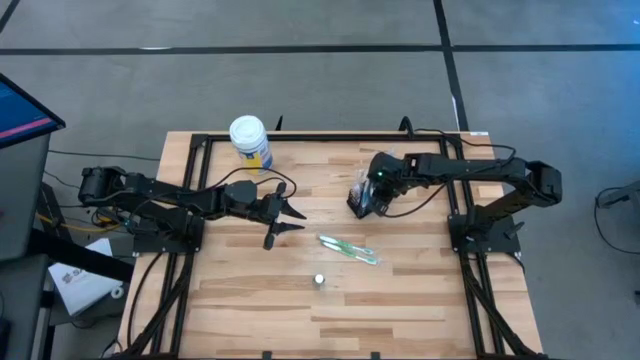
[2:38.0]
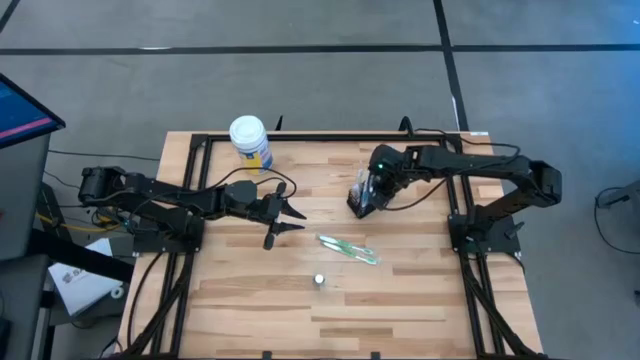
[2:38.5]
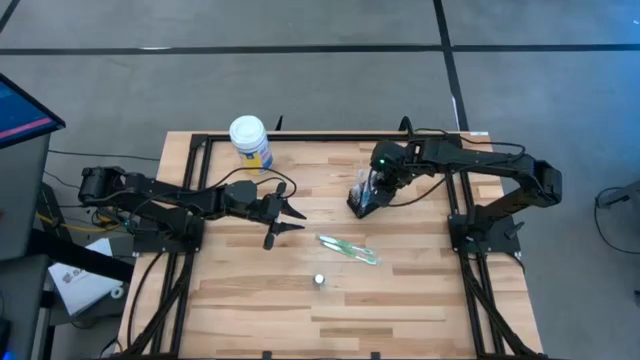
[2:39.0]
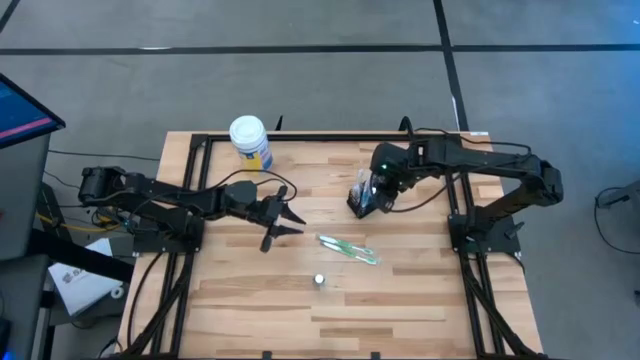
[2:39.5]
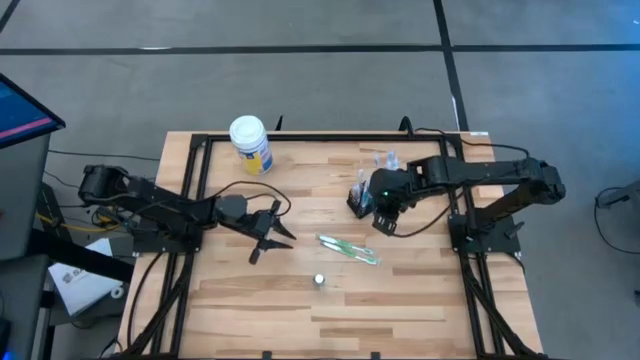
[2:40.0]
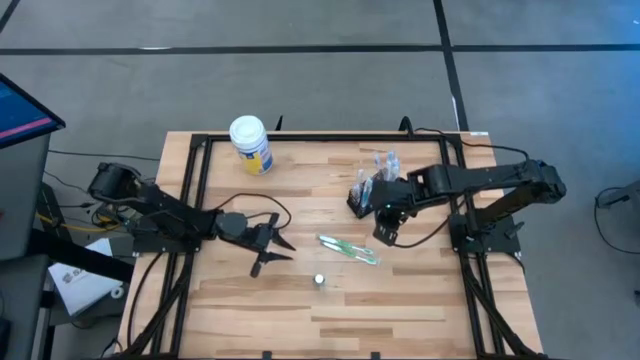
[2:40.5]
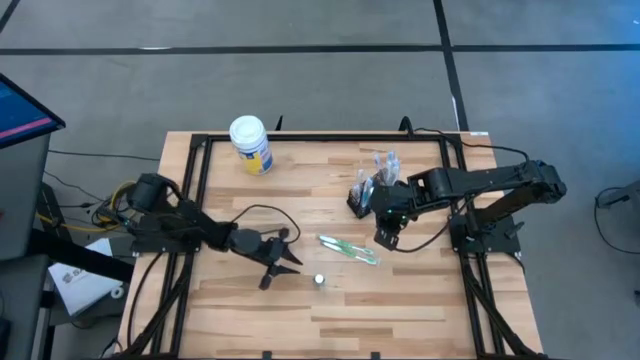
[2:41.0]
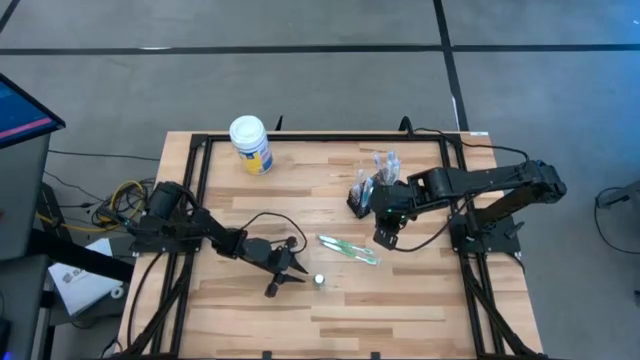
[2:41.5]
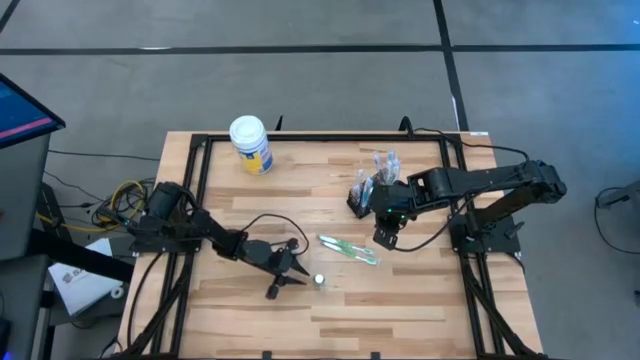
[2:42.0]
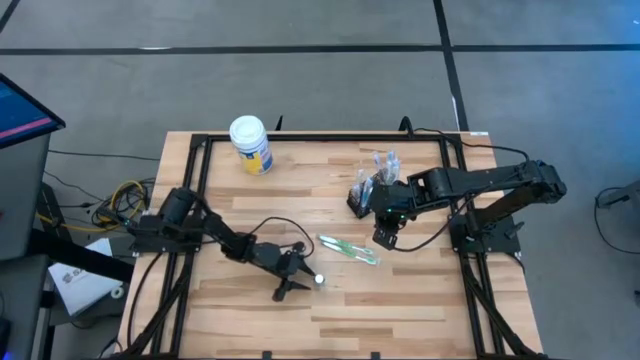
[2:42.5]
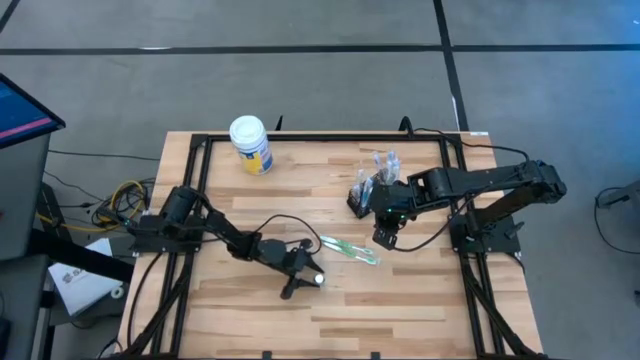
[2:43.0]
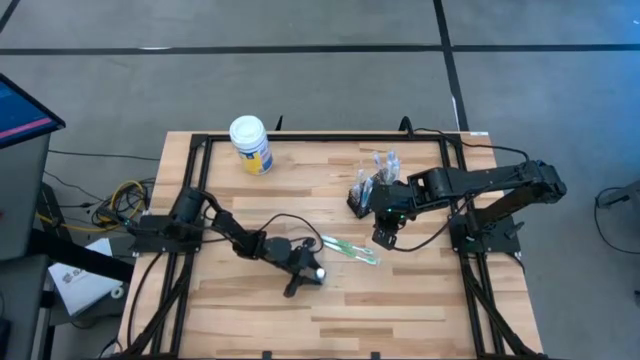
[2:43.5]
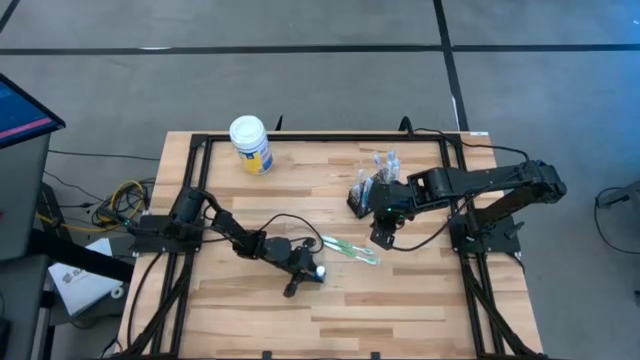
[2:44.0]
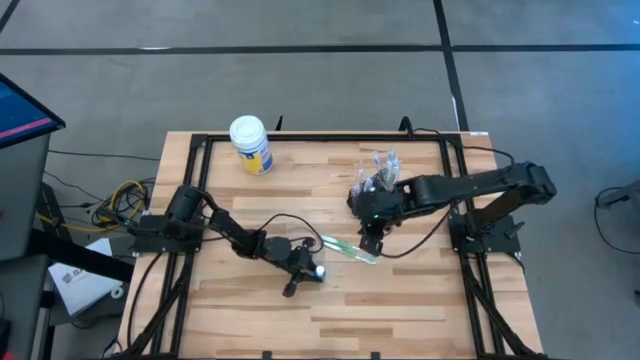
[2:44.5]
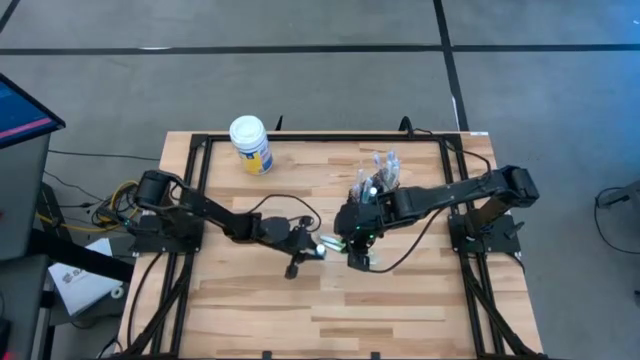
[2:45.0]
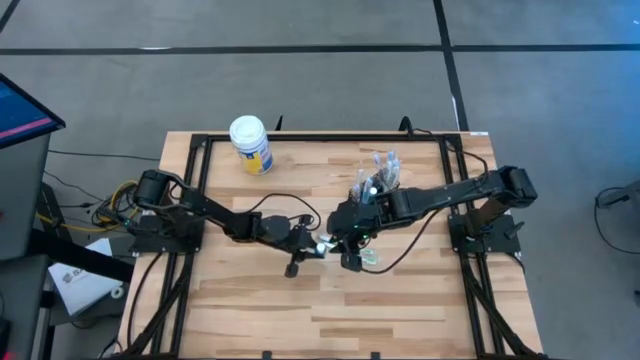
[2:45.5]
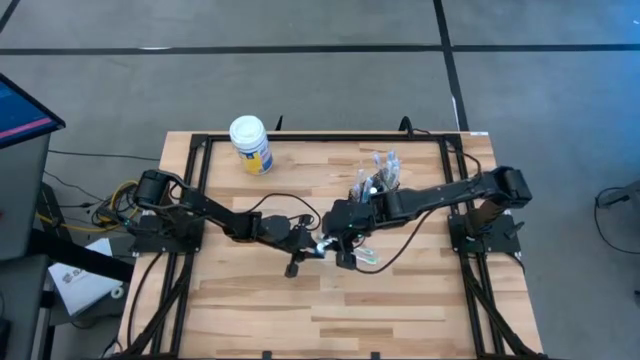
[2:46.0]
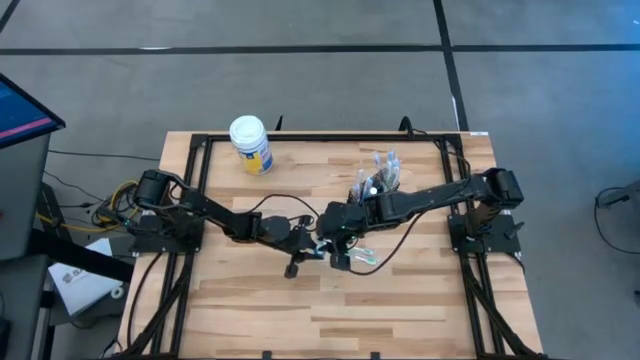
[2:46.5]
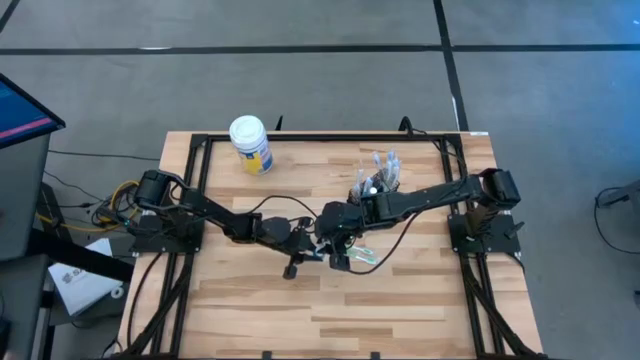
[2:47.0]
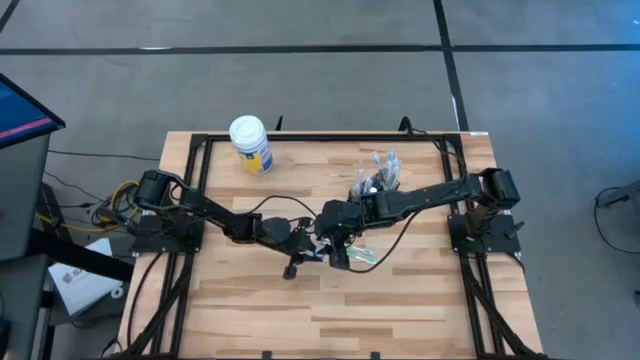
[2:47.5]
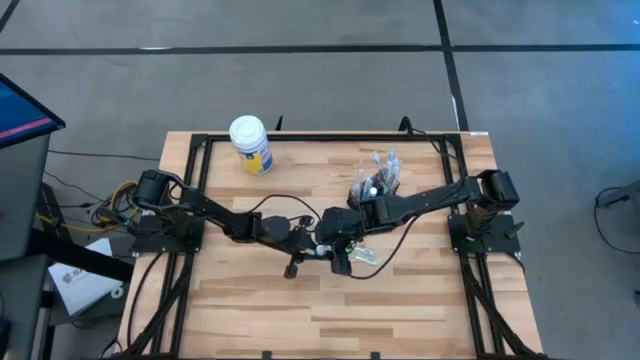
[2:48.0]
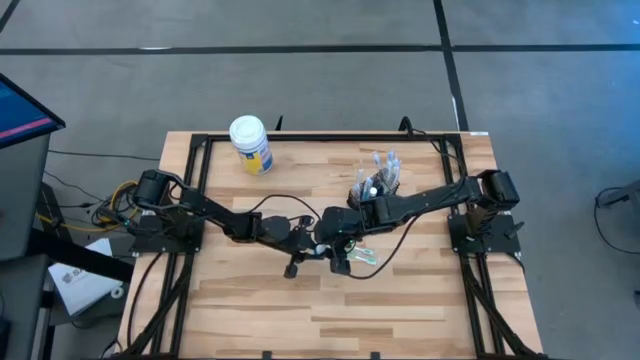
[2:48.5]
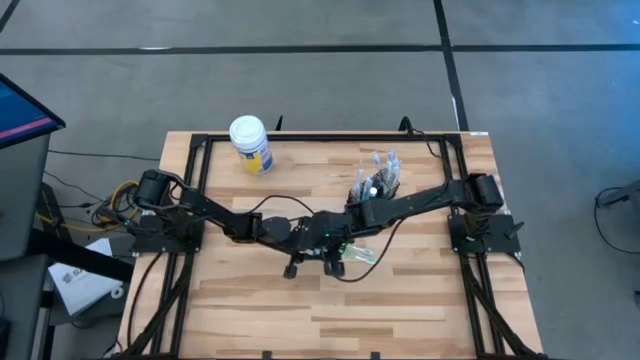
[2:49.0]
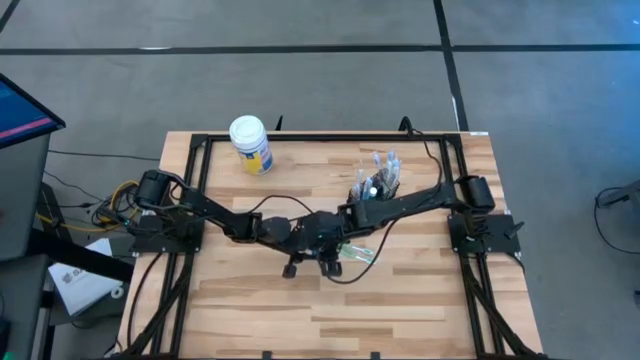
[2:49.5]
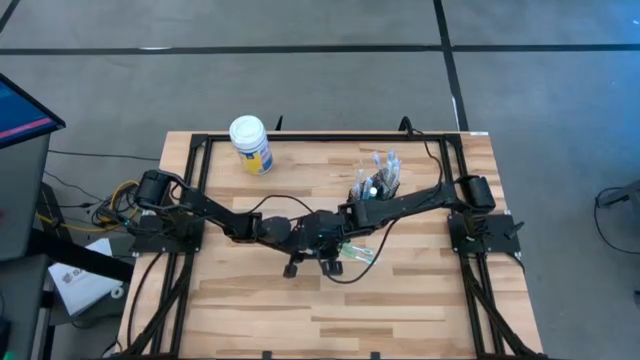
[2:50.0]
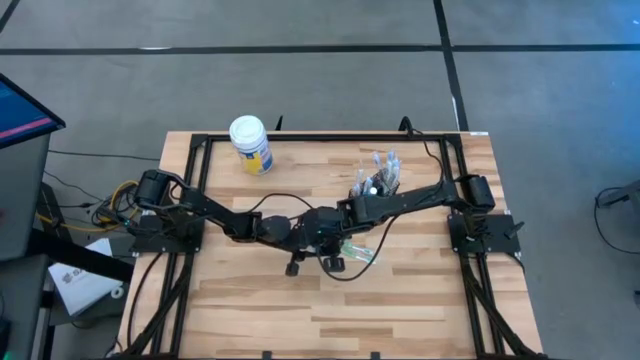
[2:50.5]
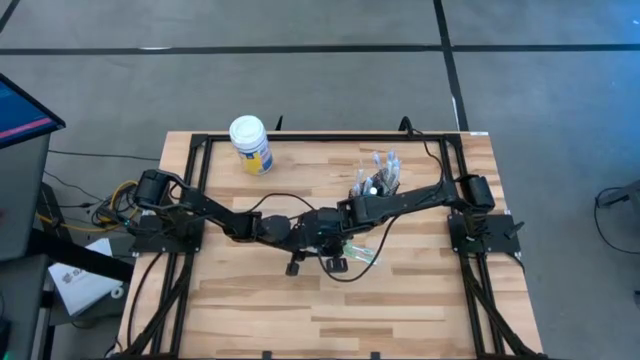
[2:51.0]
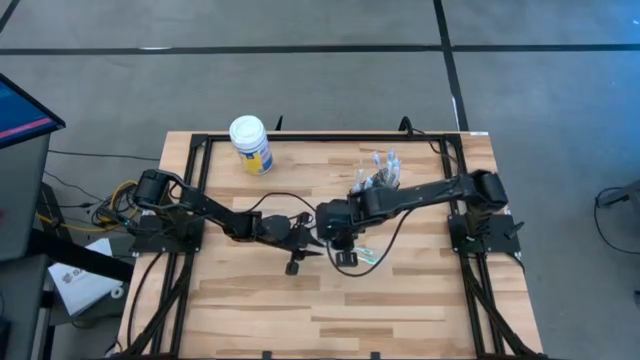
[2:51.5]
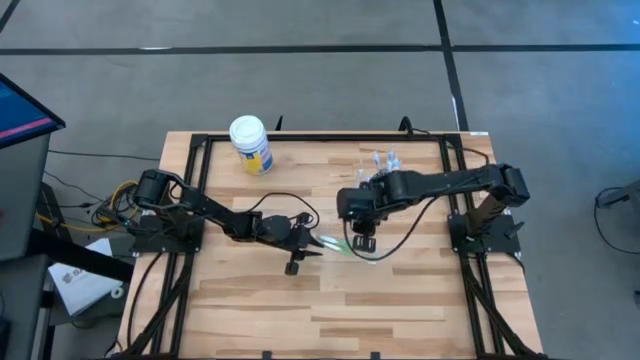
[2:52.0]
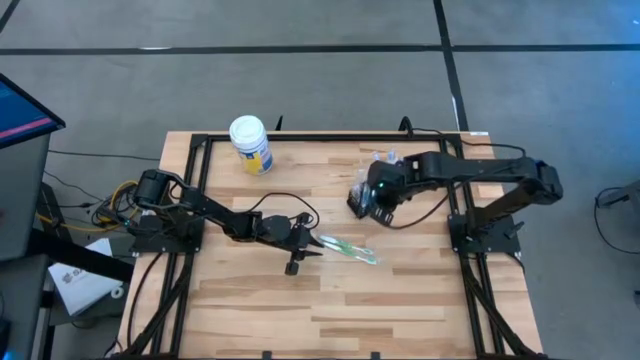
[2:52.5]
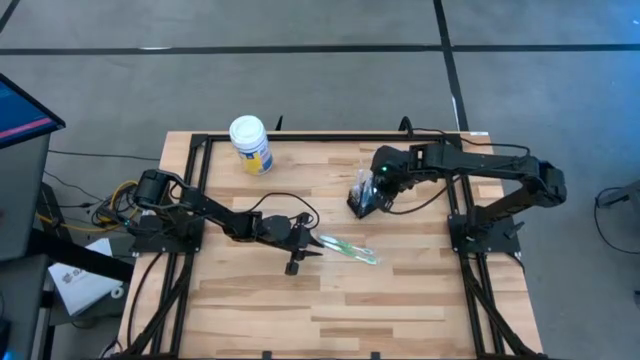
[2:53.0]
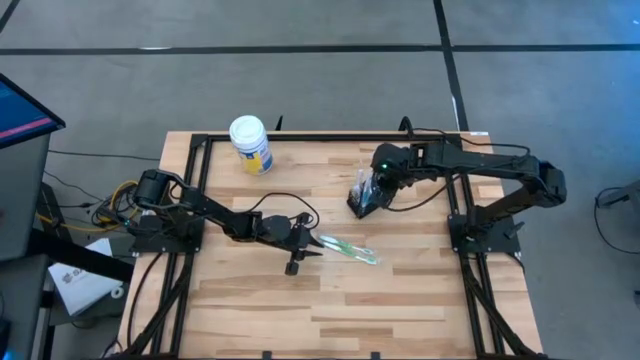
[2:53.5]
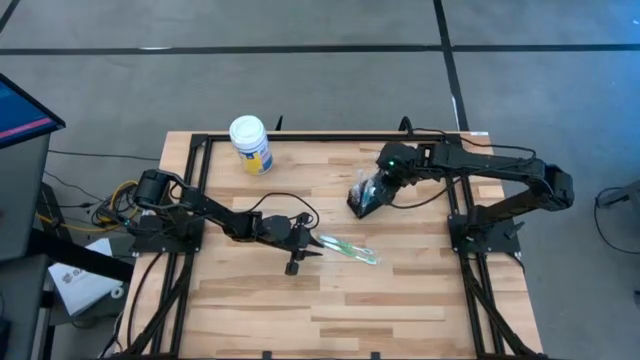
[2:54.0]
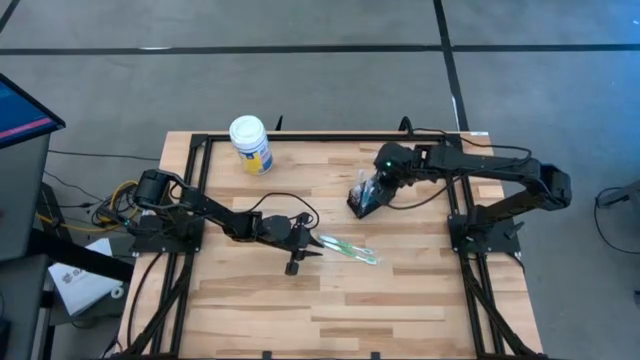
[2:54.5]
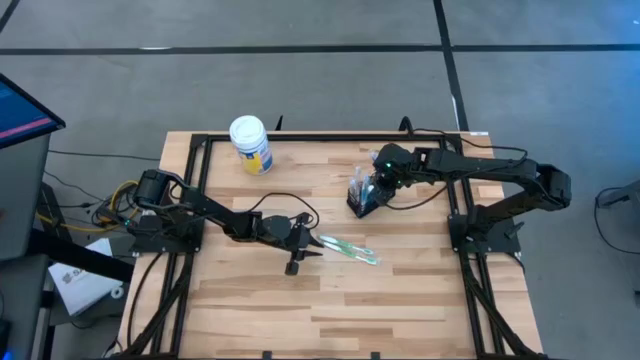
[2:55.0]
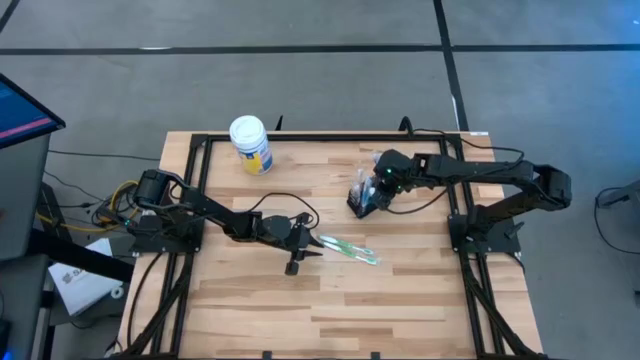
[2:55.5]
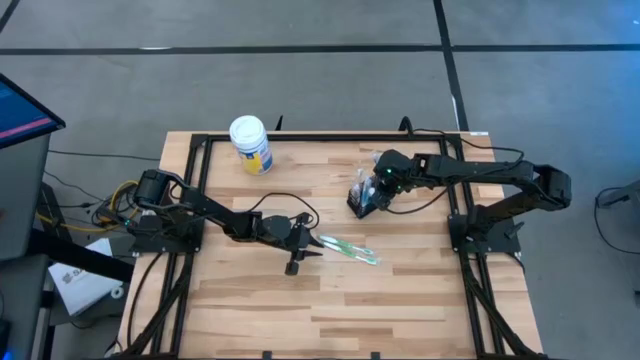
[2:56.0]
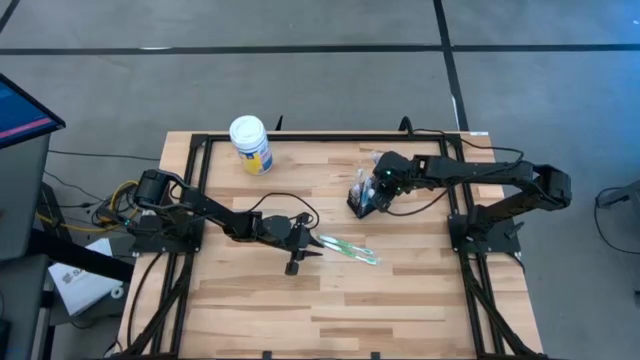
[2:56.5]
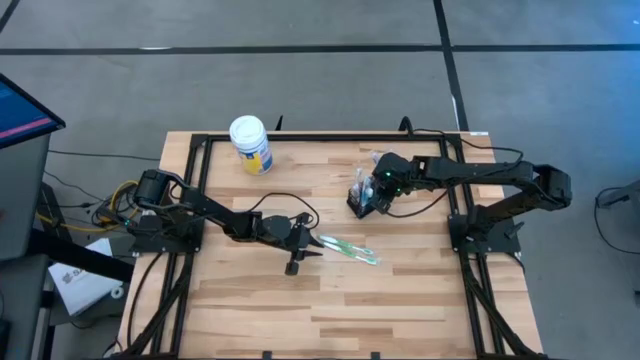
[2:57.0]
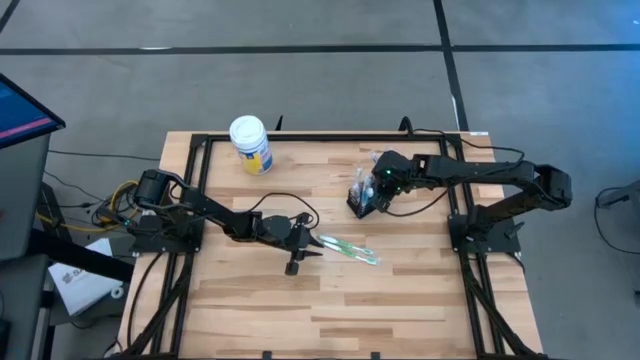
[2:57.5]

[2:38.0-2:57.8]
Task: Pick & Place toothbrushing station
Put the blue mouthwash into the mesh organizer

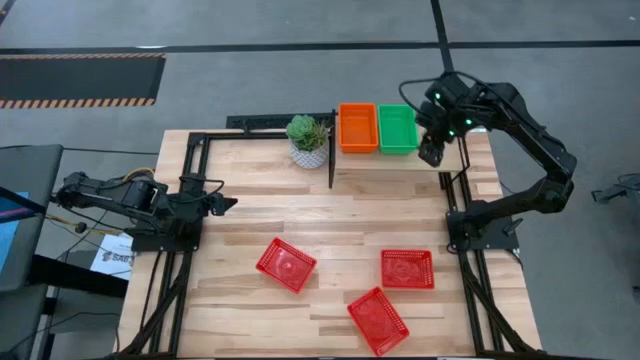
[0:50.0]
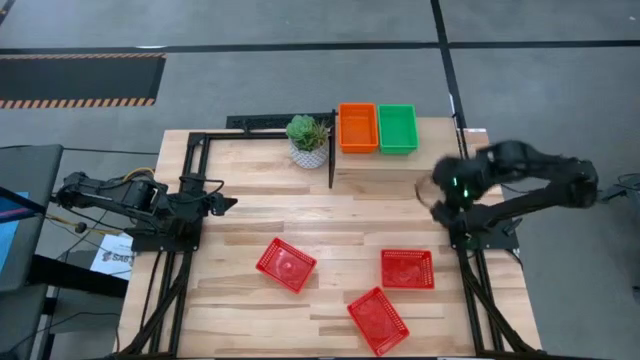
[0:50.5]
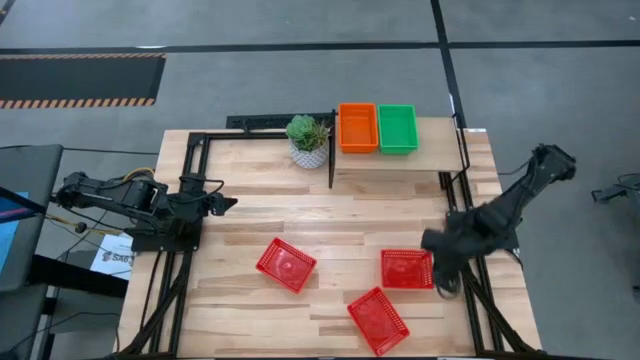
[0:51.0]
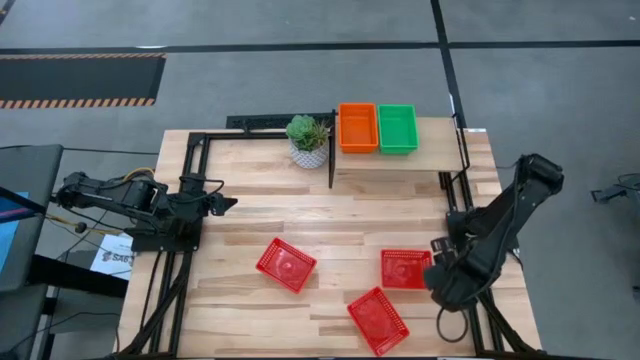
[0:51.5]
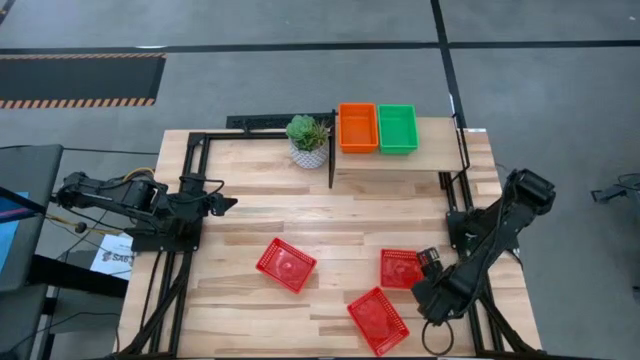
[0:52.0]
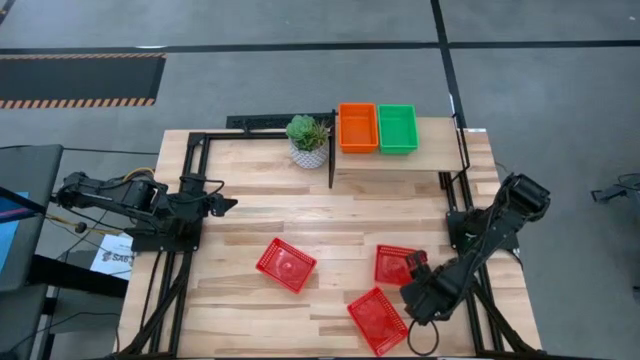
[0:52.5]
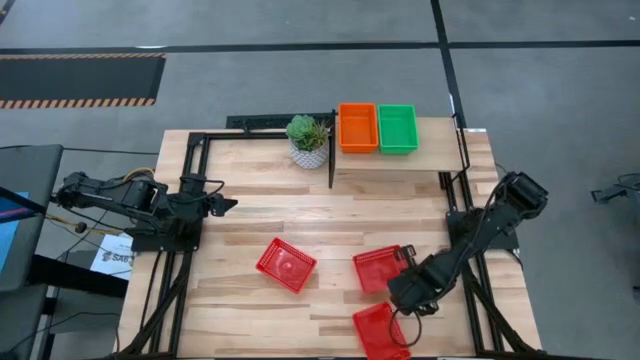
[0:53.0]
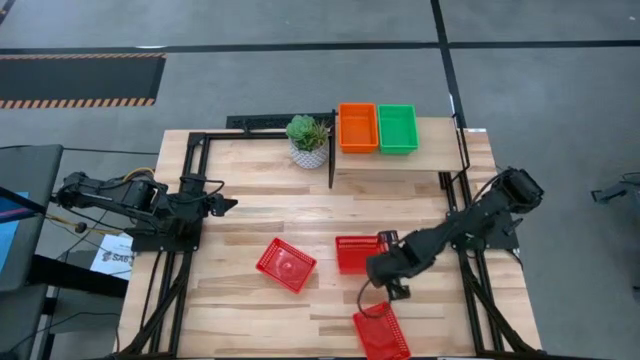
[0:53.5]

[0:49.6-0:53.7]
Task: Stack baskets on shelf by color
Put the top right red bin on the shelf
